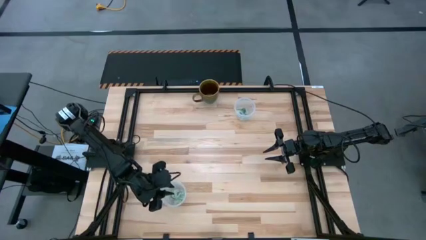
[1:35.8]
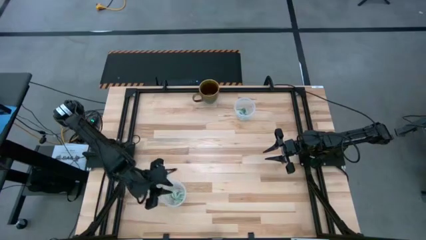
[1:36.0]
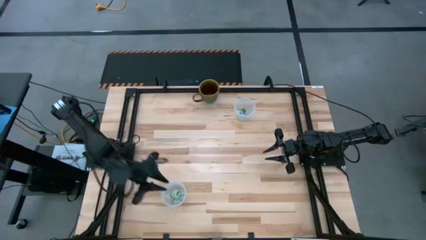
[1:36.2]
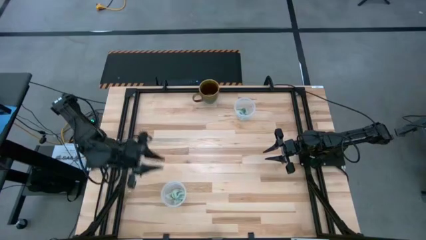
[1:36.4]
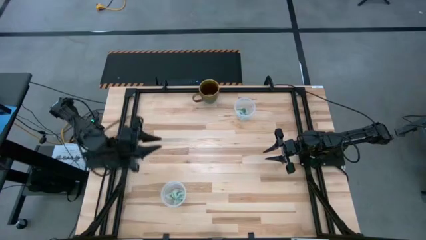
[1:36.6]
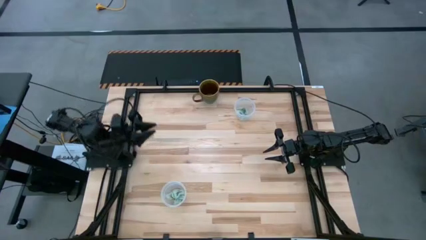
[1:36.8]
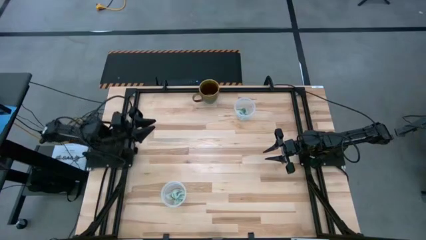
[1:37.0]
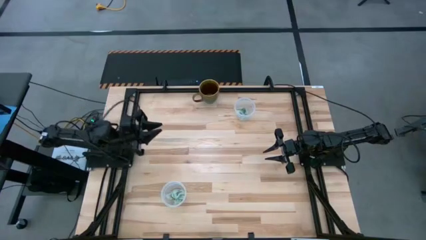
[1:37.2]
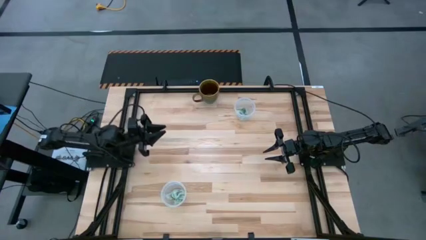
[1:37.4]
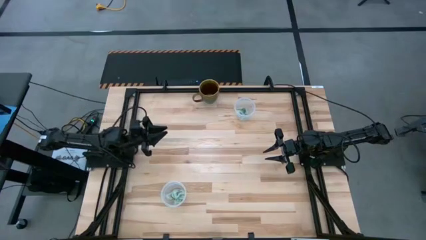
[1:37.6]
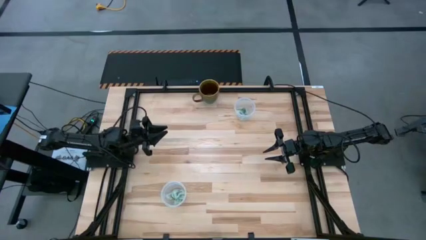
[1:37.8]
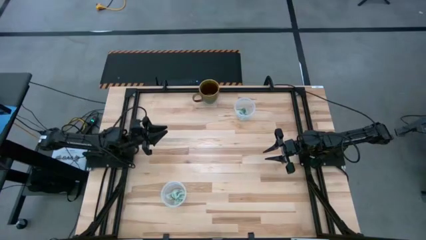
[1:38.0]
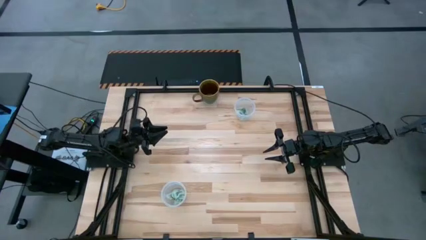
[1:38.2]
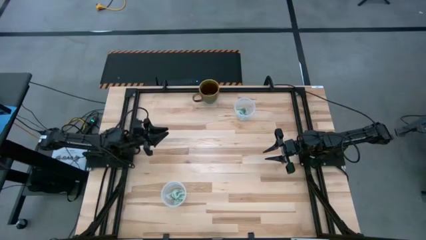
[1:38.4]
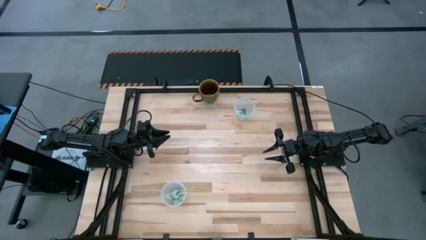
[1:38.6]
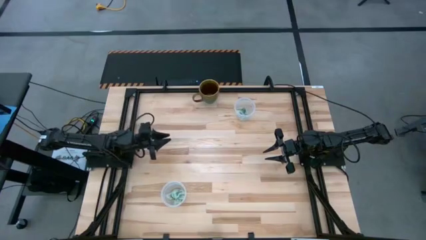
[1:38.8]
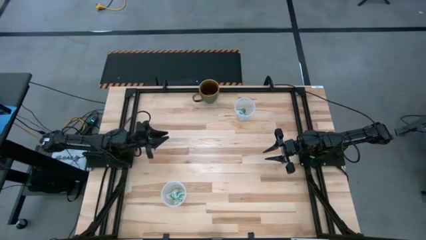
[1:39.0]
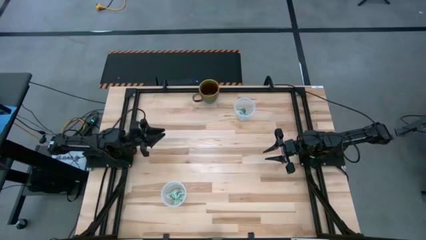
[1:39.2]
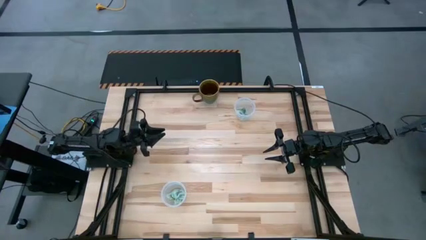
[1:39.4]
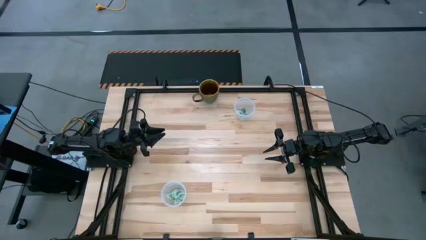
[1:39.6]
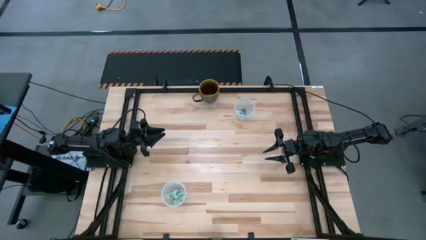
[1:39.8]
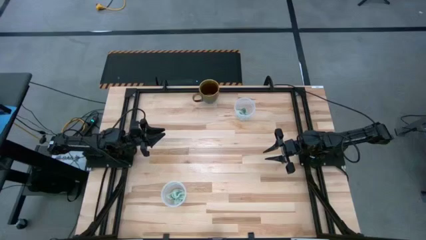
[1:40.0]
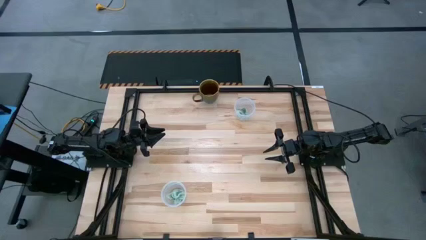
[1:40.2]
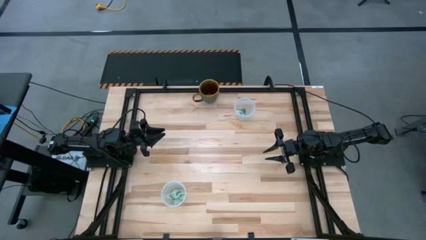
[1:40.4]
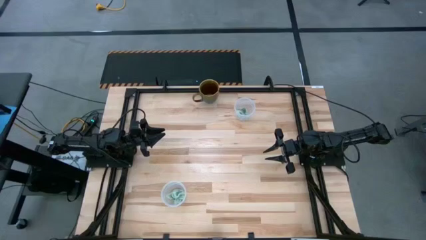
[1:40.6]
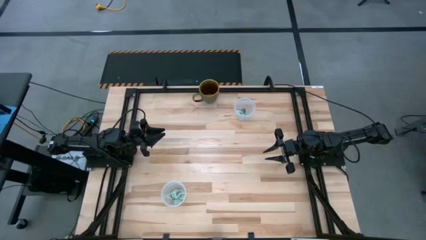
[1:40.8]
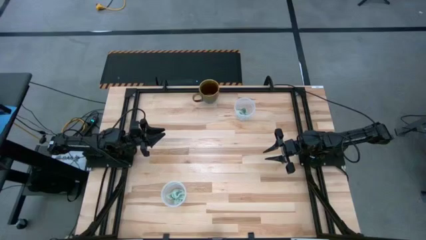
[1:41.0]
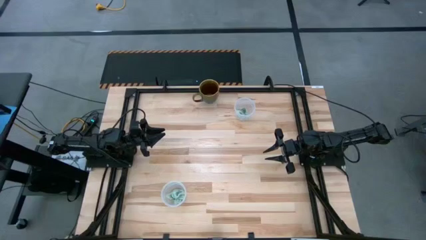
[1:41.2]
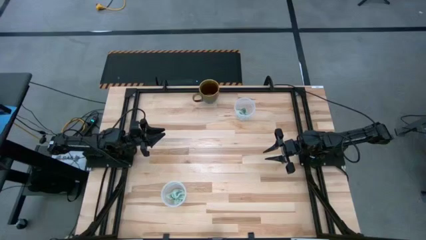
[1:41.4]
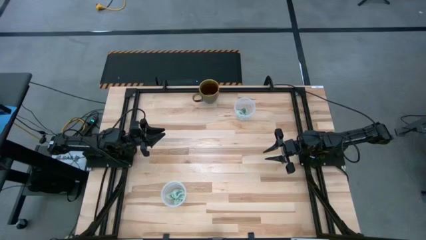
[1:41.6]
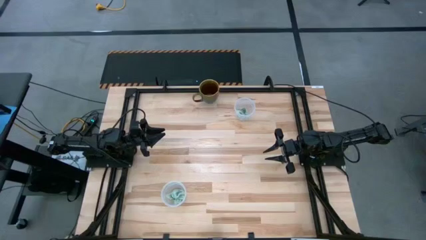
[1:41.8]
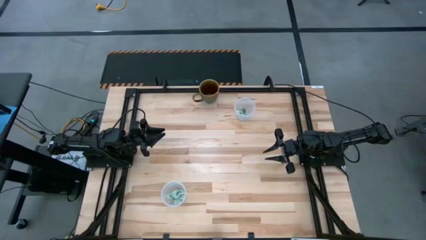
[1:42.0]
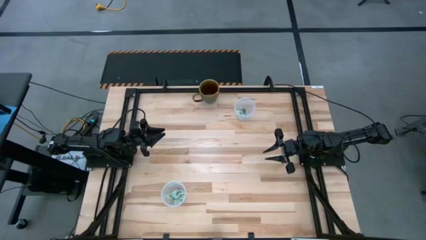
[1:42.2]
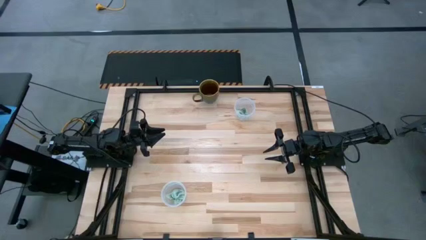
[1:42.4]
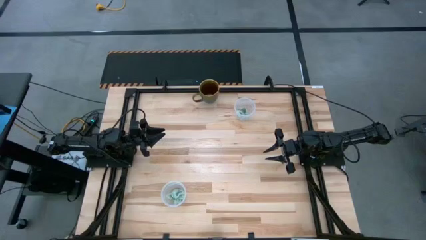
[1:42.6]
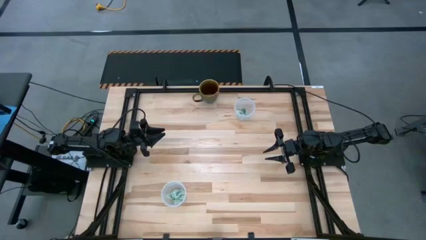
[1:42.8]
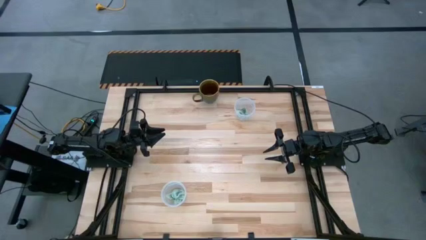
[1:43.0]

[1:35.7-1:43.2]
Task: Pick and place items into bin
Return to Home Position

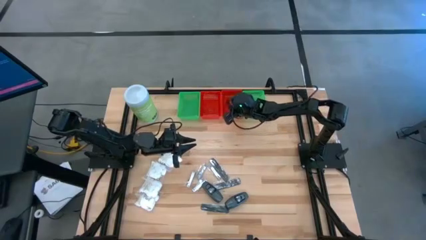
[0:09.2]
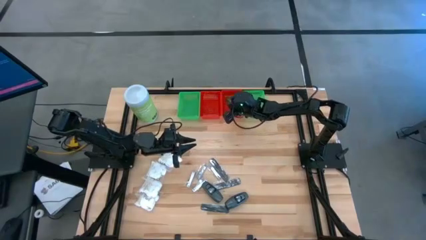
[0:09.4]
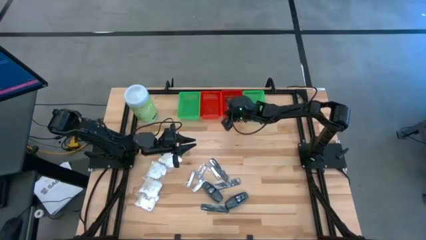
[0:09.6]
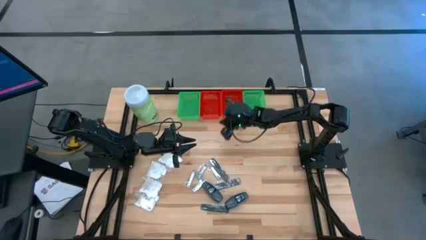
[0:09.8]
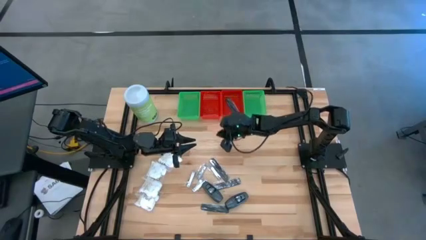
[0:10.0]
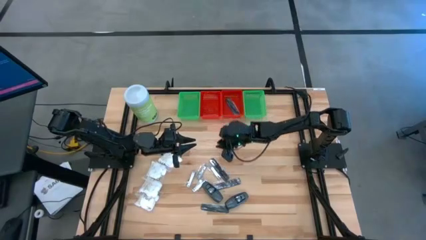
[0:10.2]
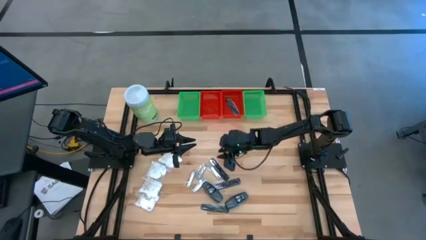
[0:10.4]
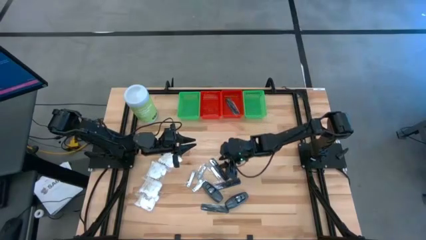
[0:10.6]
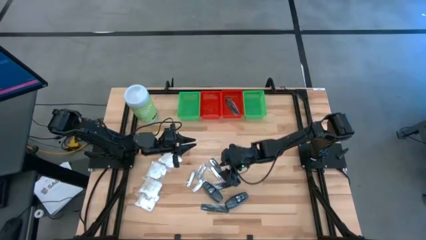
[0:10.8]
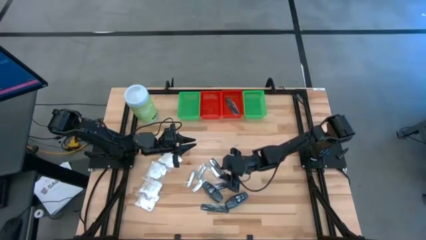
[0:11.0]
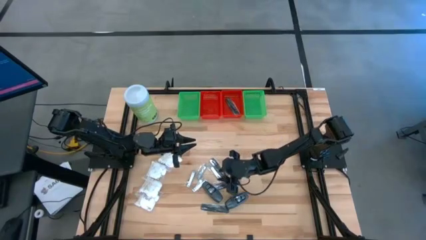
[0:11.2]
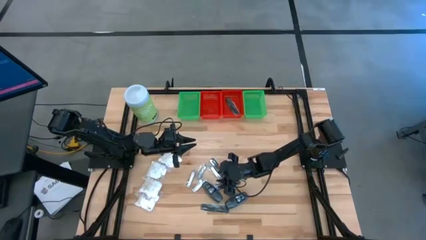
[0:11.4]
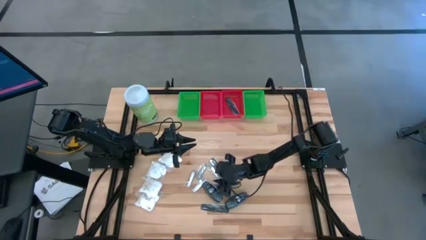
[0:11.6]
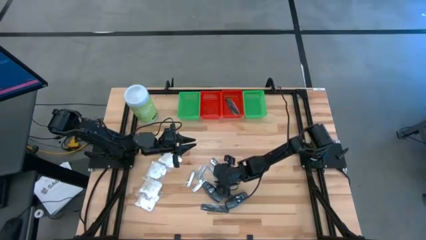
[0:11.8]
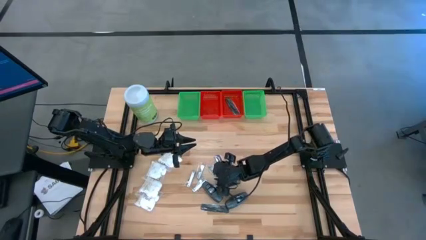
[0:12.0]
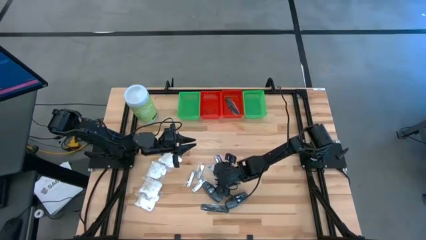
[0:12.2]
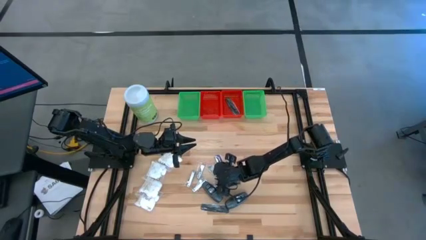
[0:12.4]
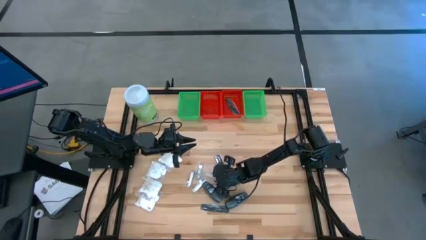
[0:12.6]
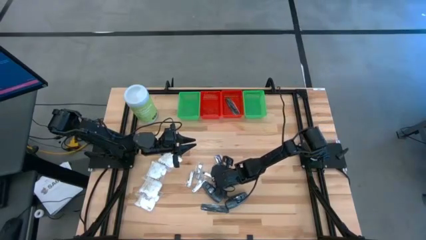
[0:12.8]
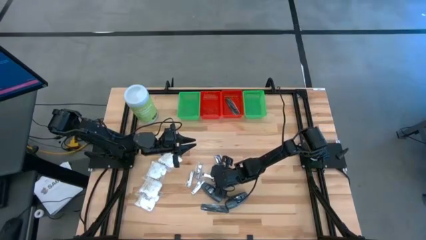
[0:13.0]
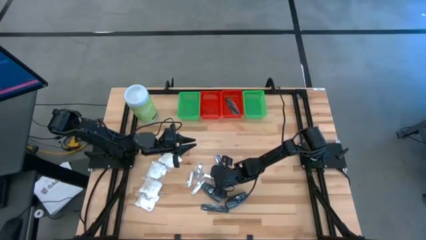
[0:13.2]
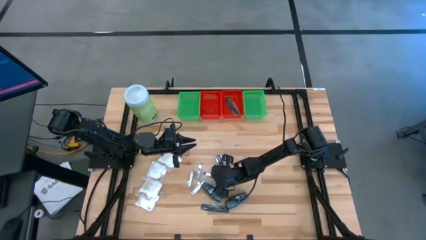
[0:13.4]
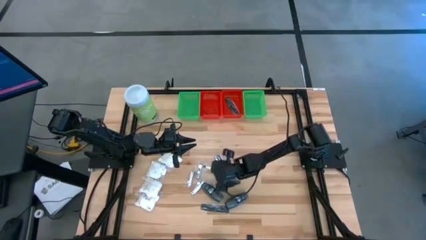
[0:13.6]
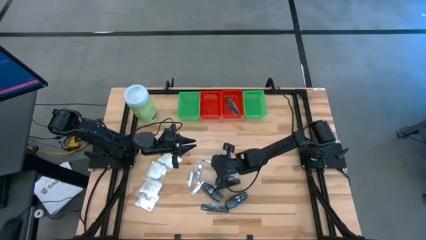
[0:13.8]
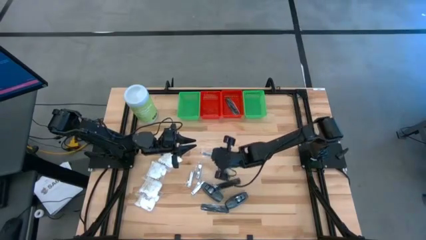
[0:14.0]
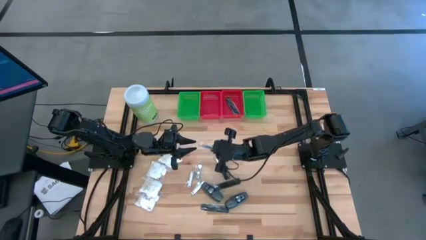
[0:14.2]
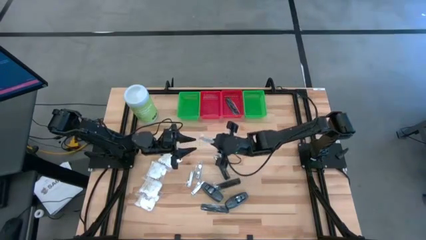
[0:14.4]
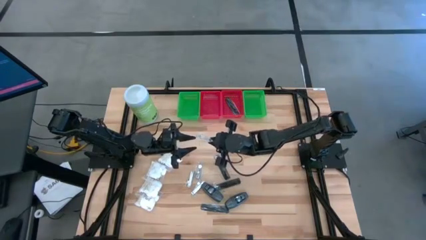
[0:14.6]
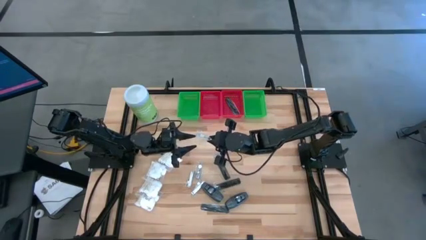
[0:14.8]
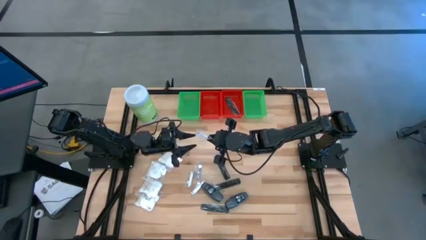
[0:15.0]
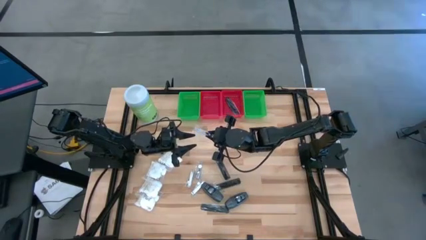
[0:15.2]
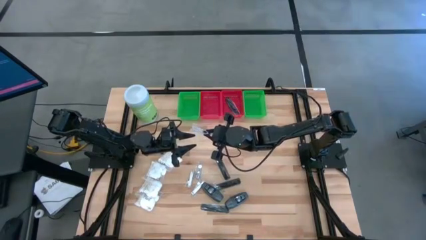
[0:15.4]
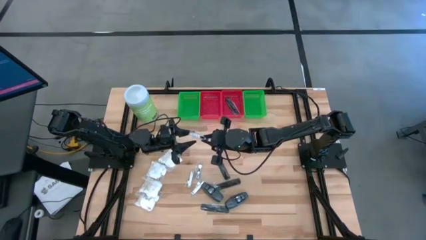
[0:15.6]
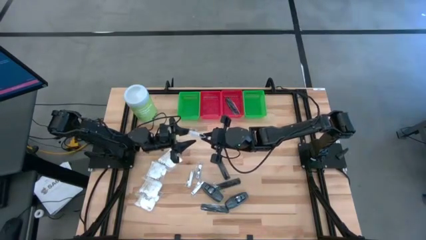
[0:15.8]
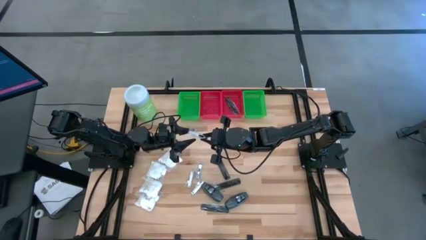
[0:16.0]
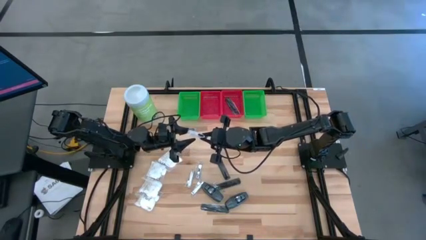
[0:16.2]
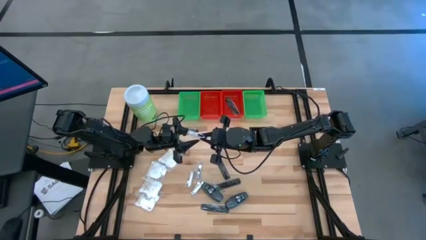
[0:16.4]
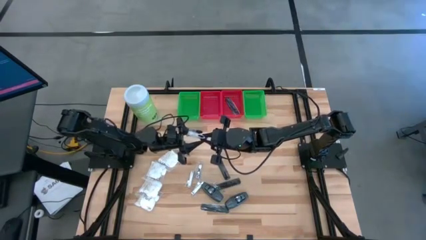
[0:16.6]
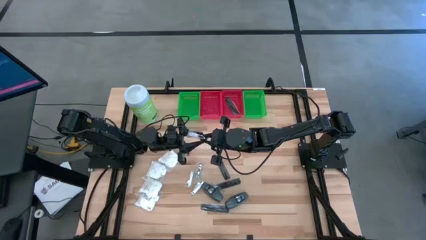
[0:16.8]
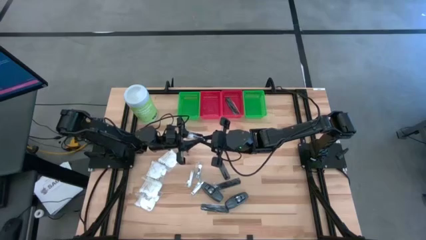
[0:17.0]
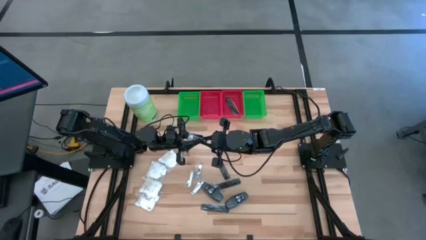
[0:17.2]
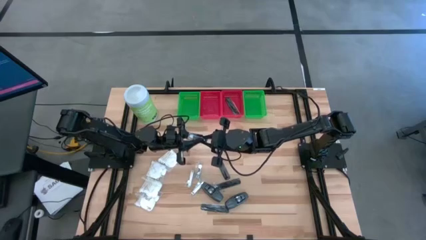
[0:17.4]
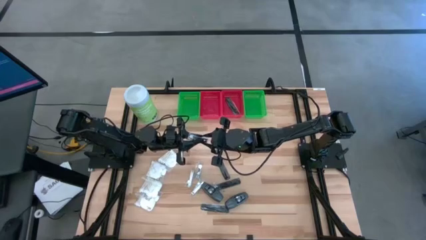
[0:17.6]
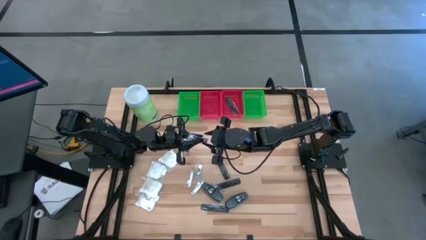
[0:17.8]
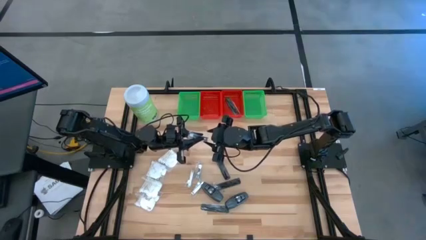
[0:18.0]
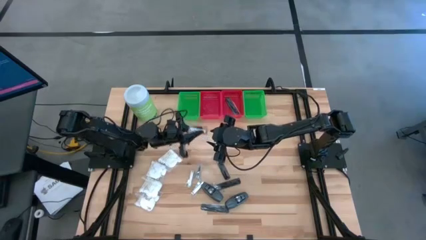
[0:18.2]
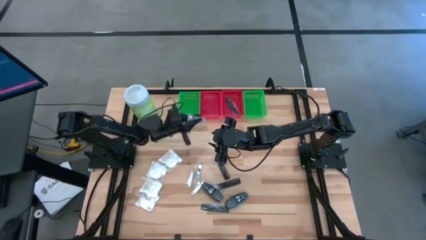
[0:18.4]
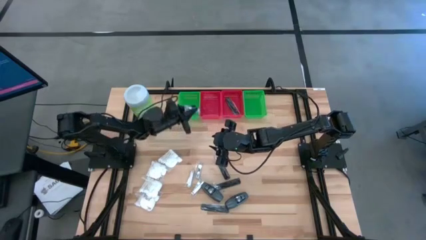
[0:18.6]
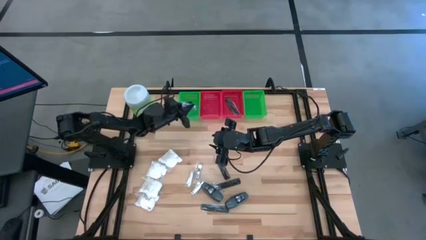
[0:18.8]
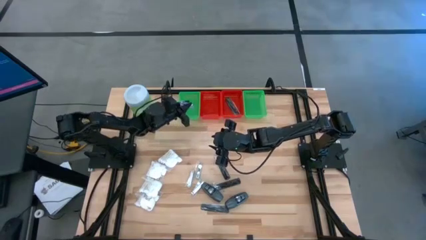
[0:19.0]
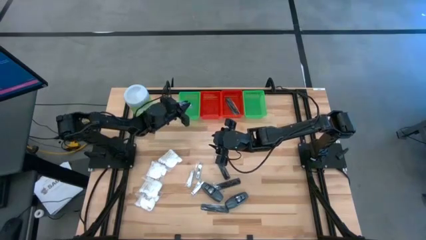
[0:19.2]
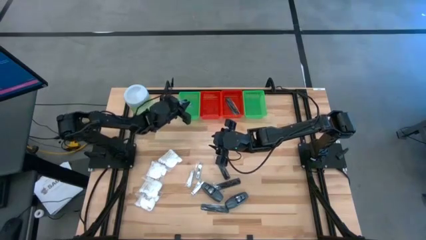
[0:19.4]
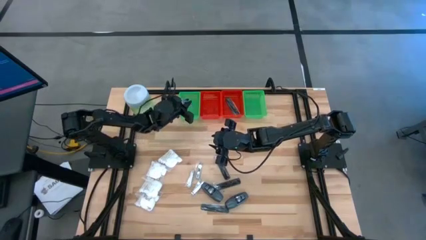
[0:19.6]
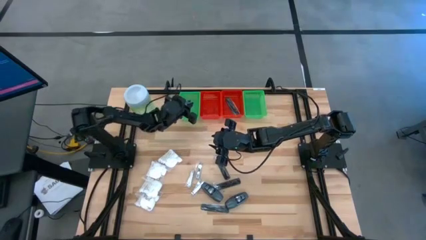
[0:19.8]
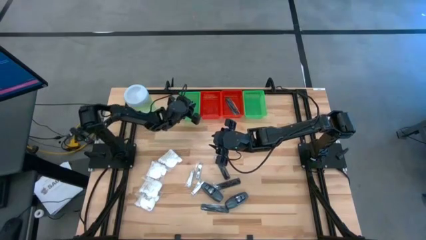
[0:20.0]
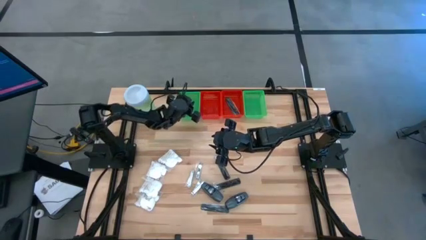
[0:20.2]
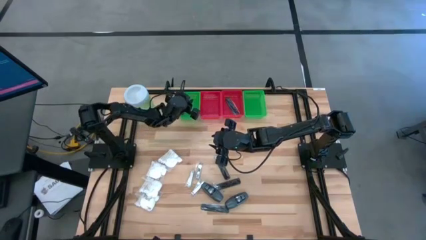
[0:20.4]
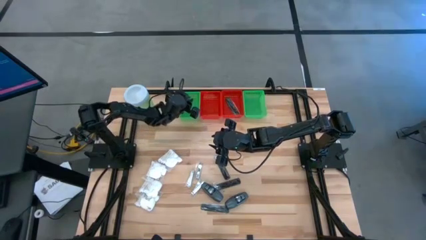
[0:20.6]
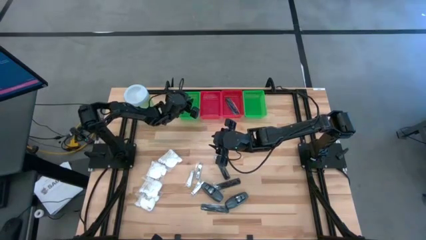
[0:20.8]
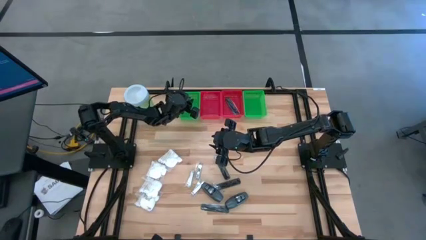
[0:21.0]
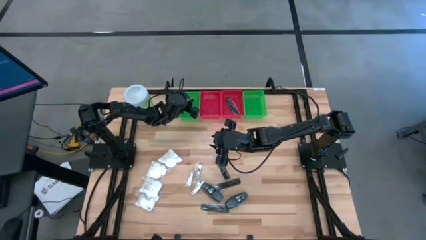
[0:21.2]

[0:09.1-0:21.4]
Task: Pick & Place Travel size toiletries
Put the silver nail cutter into the left green bin
